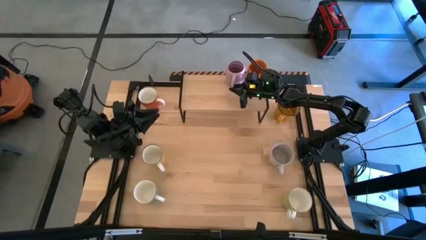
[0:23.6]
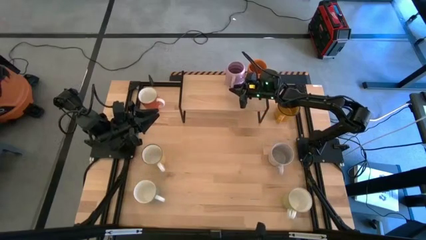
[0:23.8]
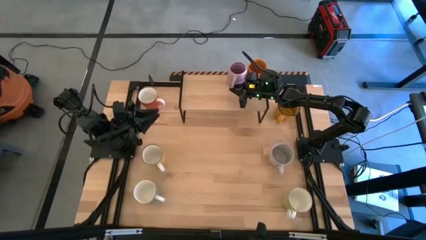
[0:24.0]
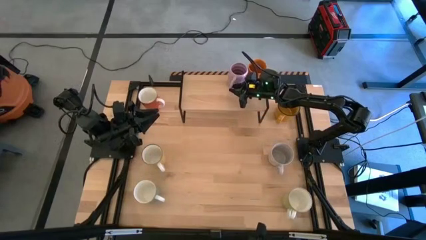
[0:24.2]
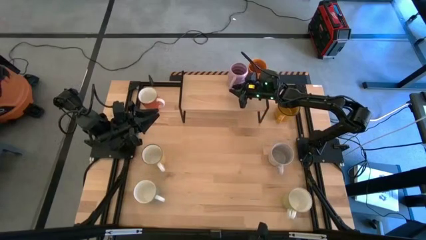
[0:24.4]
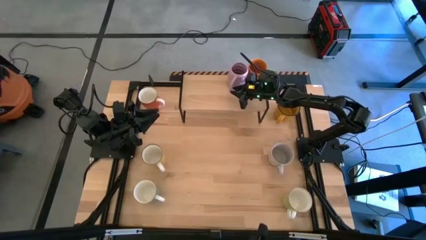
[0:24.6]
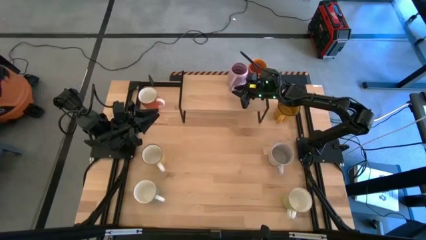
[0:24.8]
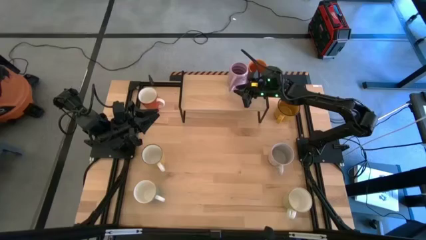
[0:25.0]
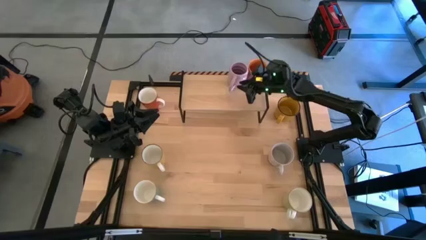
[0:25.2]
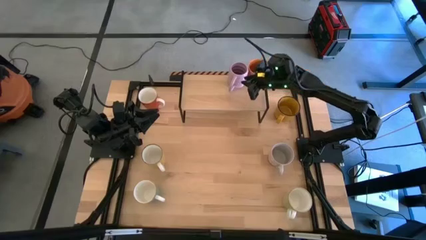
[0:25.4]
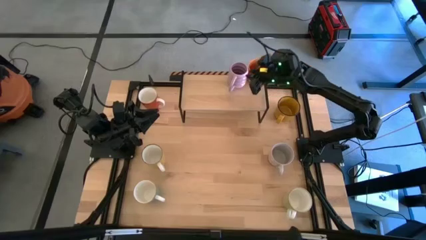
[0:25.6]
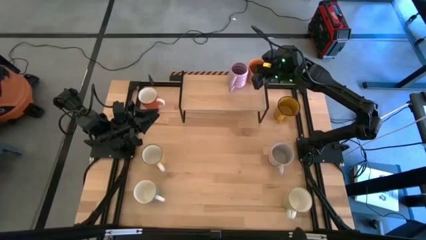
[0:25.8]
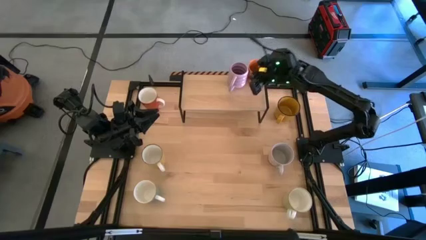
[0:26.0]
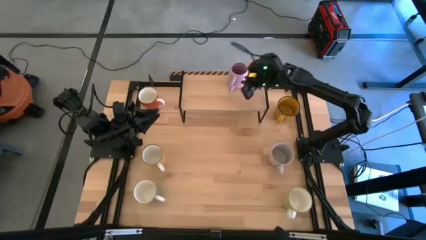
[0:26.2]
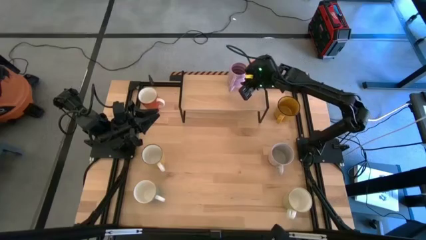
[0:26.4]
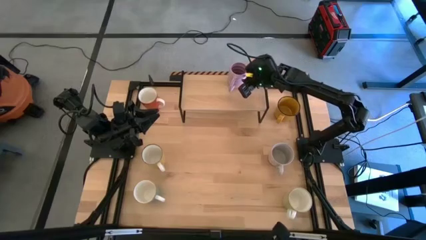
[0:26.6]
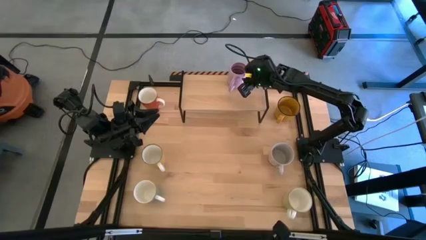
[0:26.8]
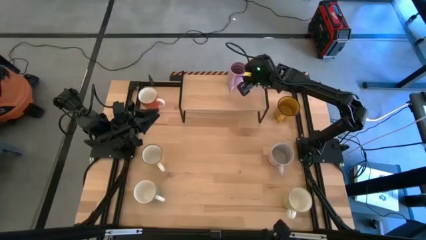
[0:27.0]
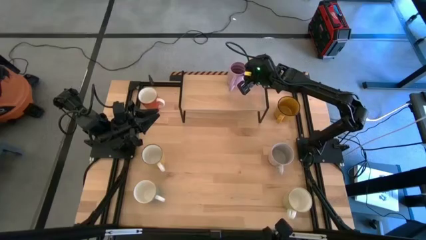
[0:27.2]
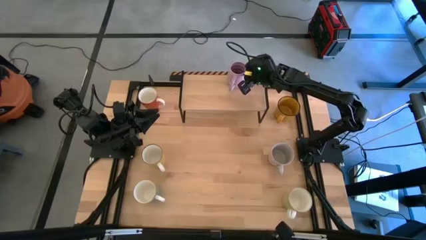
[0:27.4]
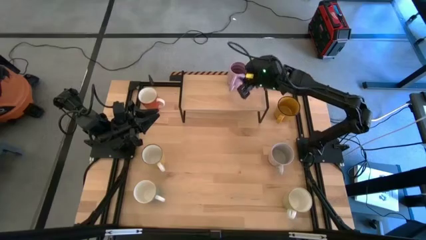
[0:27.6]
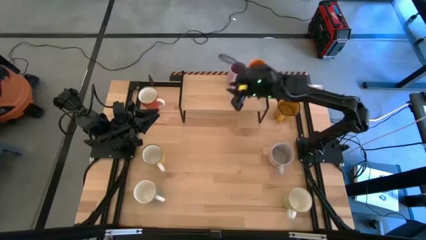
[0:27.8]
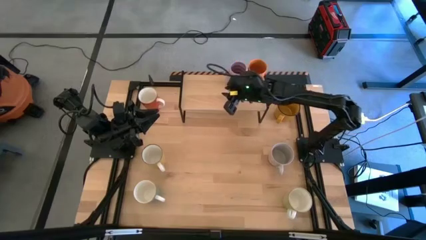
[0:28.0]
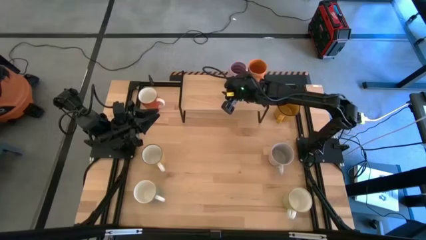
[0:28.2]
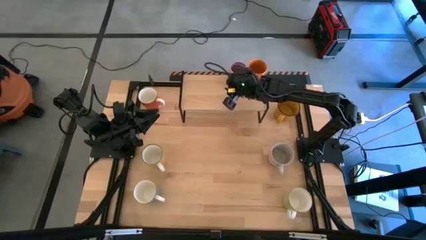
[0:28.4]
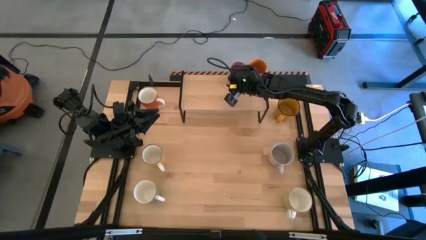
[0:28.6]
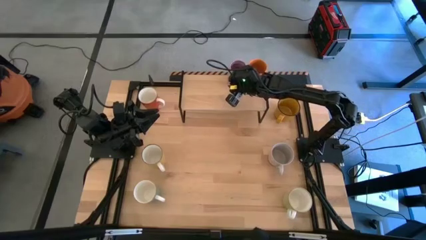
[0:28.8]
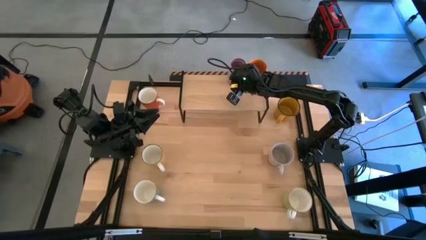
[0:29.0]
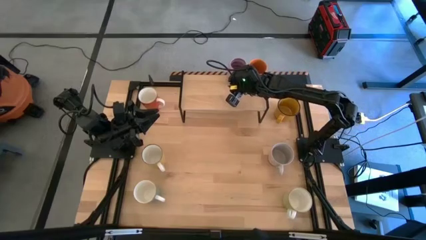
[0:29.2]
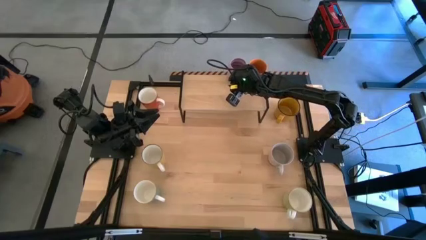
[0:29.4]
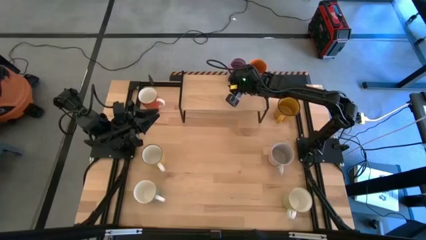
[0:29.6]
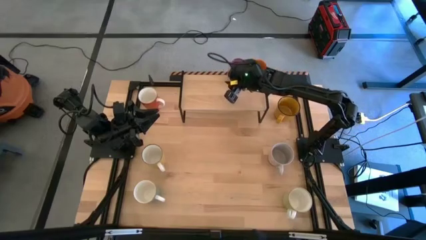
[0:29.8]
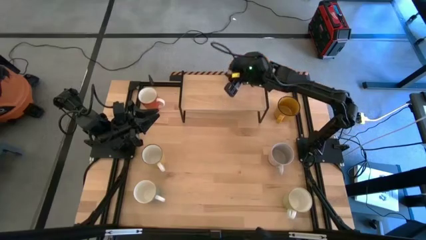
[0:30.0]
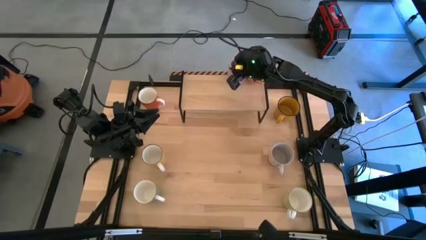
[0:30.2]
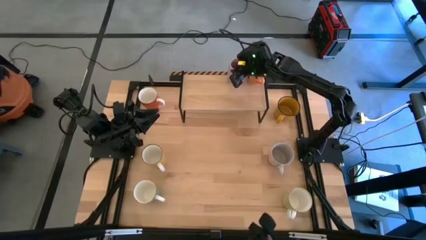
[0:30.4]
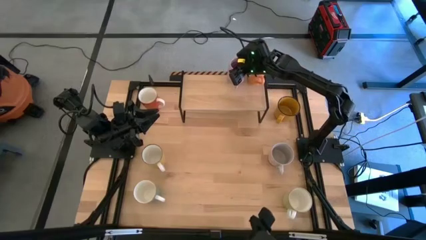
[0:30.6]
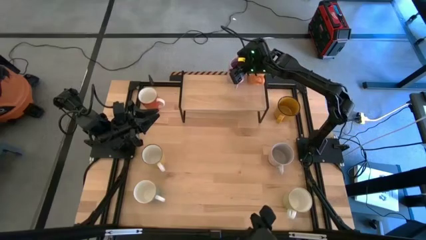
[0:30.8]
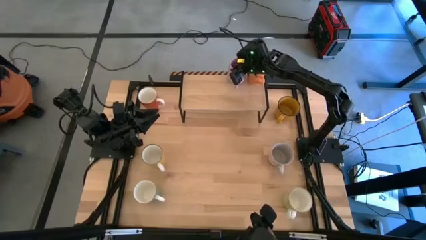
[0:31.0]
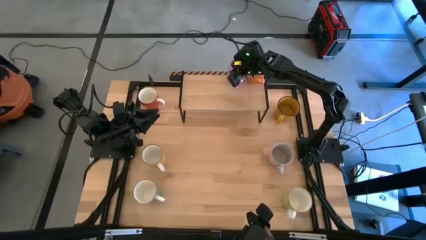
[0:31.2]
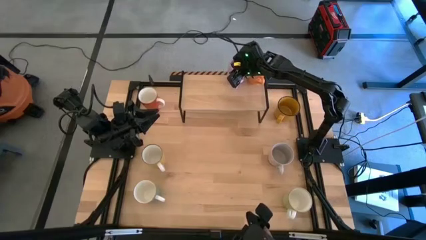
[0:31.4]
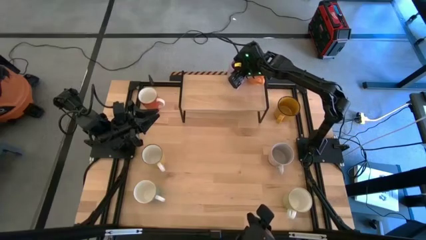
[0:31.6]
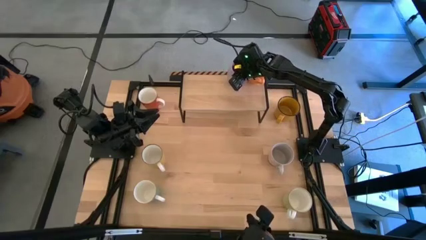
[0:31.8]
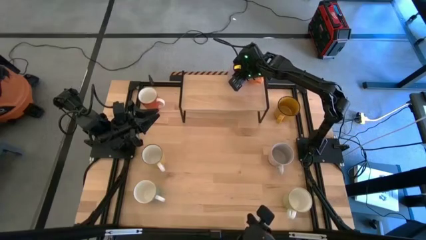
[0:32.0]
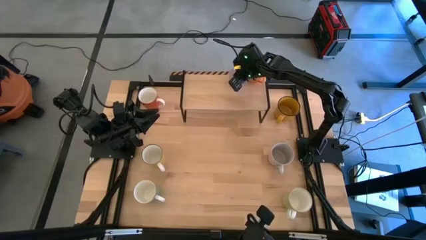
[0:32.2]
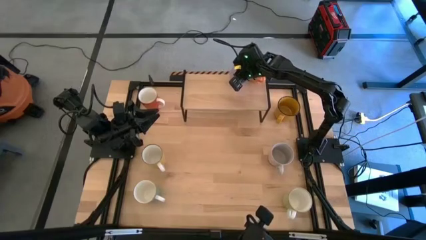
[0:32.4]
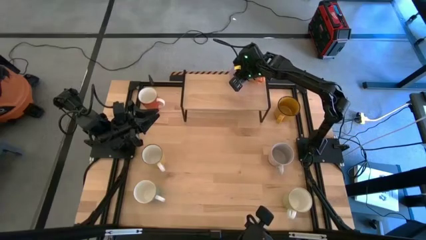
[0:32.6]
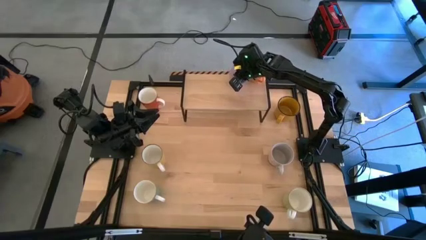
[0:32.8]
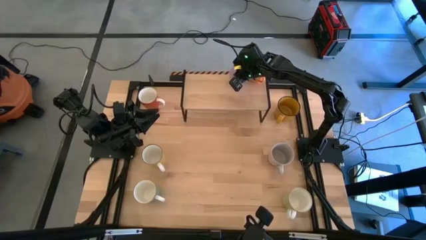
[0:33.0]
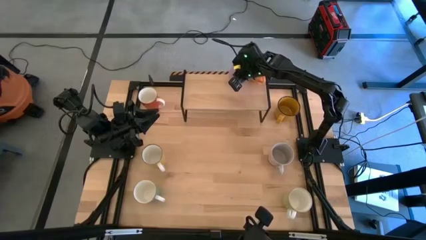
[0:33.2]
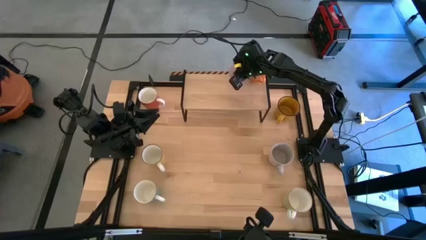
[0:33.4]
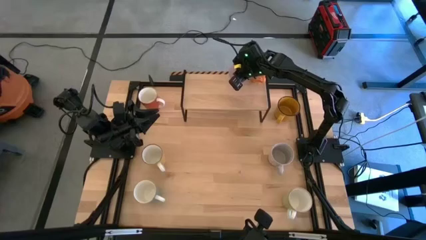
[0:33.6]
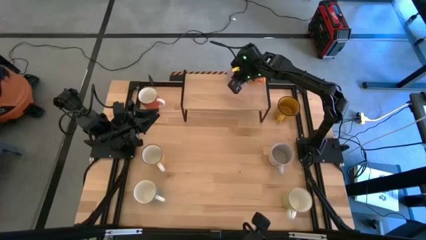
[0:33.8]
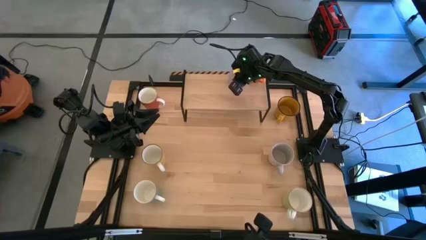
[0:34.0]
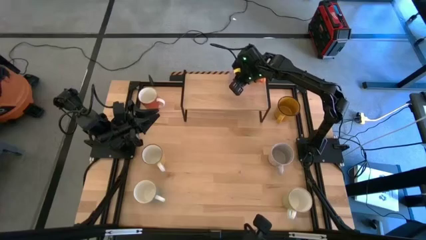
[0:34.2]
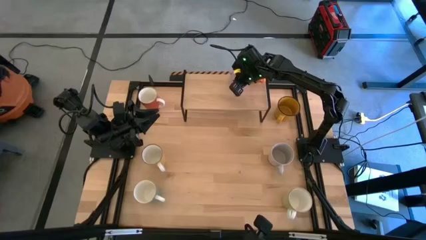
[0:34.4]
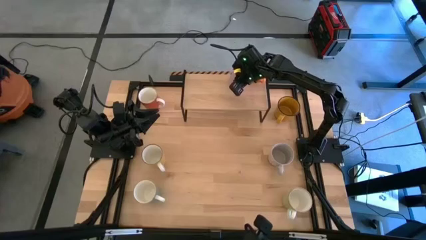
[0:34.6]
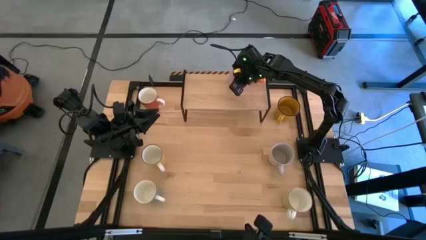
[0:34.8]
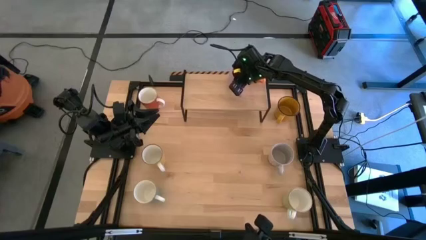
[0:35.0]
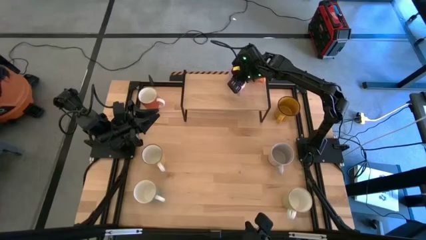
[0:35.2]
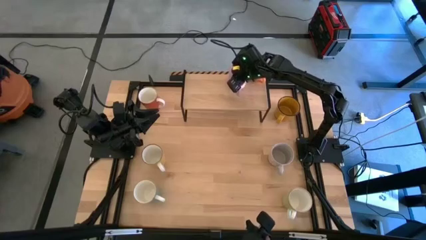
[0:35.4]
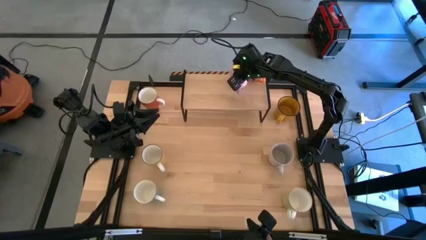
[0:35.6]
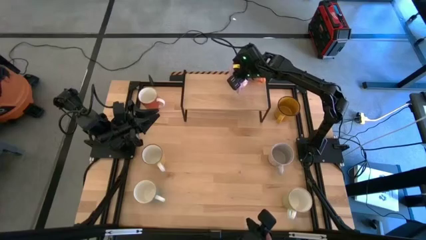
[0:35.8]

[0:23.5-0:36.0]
Task: Place coffee mugs
Put the violet mug on the shelf

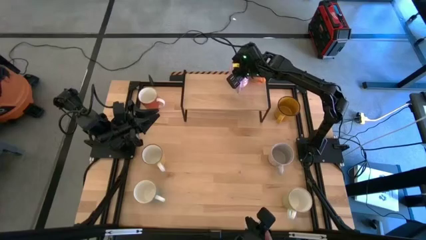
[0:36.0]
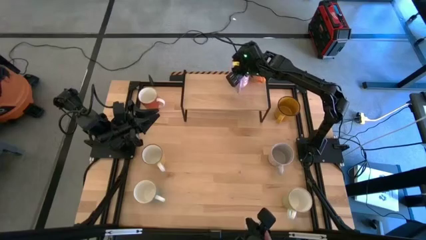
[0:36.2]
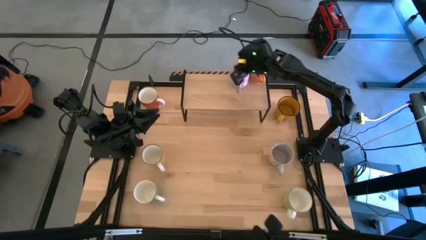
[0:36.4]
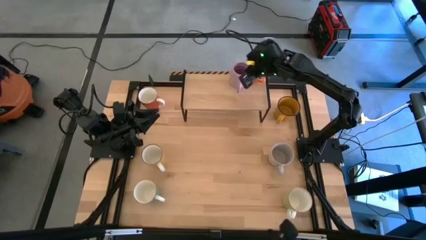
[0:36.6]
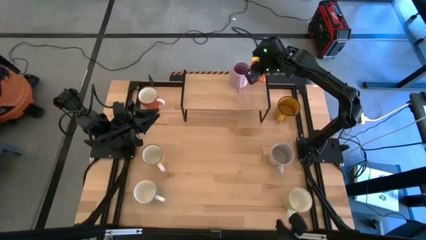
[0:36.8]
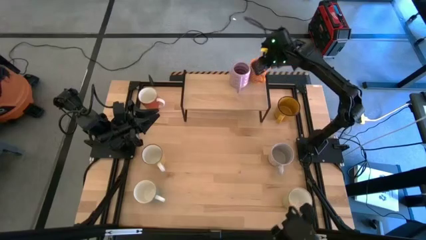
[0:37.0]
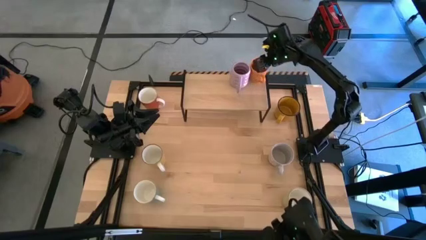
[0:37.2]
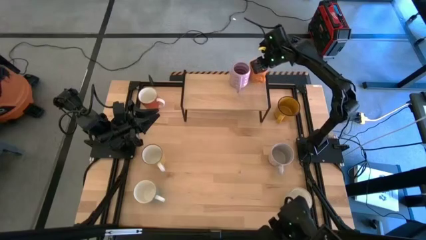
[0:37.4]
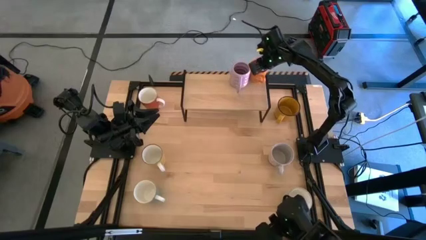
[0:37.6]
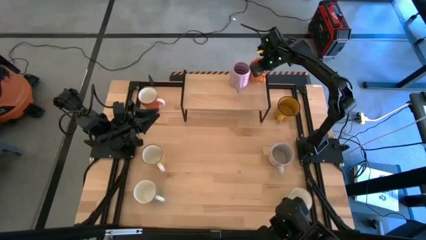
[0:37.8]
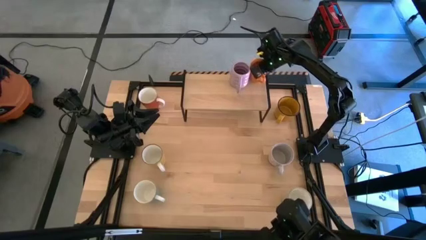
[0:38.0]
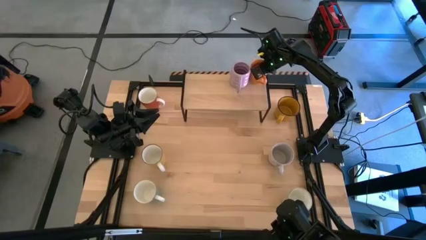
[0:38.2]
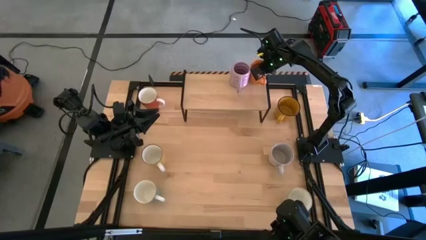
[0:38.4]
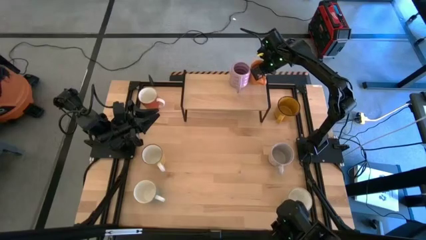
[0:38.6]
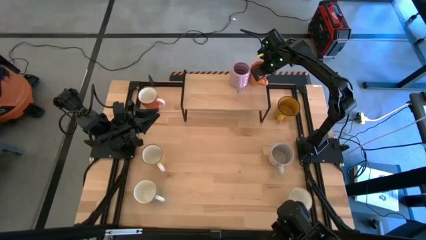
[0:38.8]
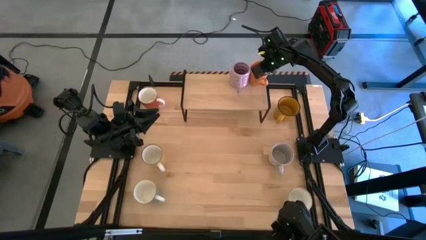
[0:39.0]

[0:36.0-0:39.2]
Adjust the orange mug on the shelf
